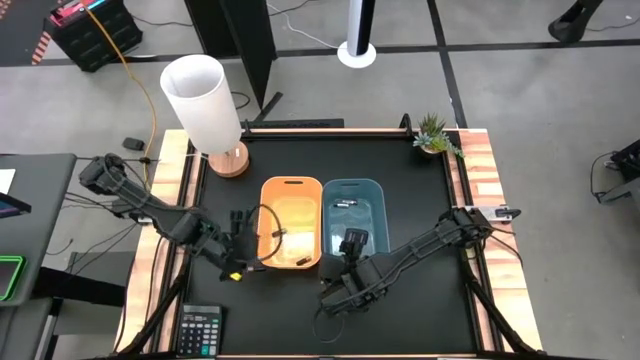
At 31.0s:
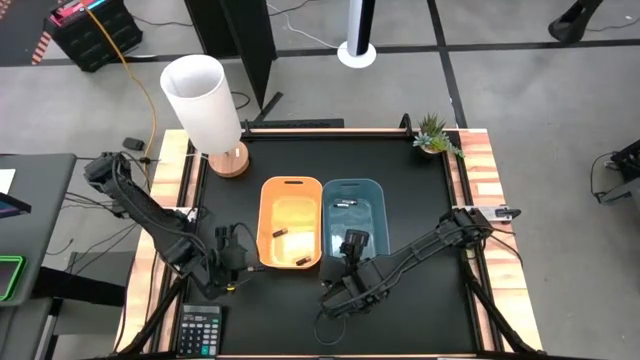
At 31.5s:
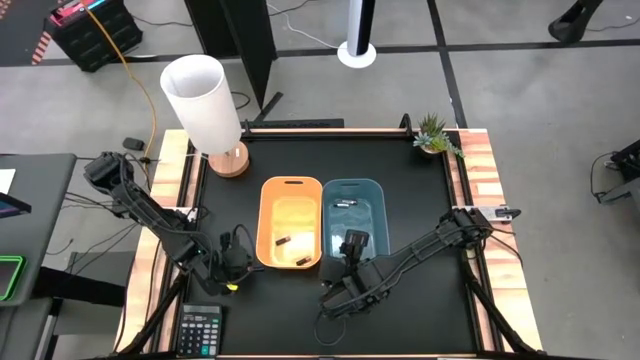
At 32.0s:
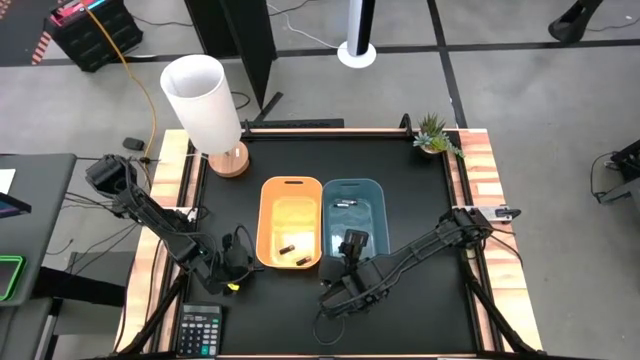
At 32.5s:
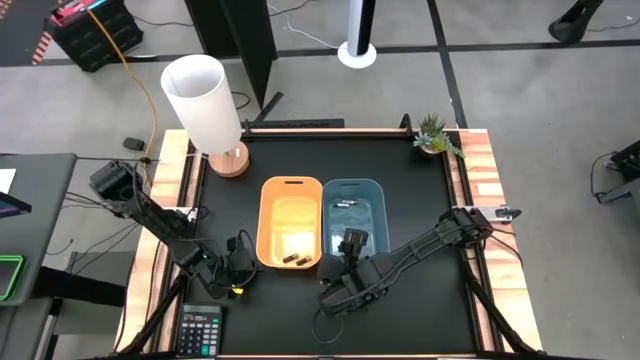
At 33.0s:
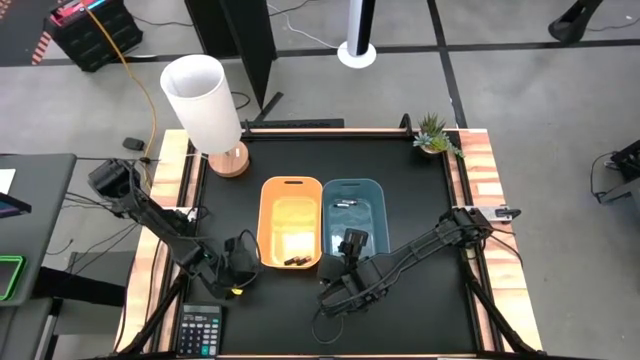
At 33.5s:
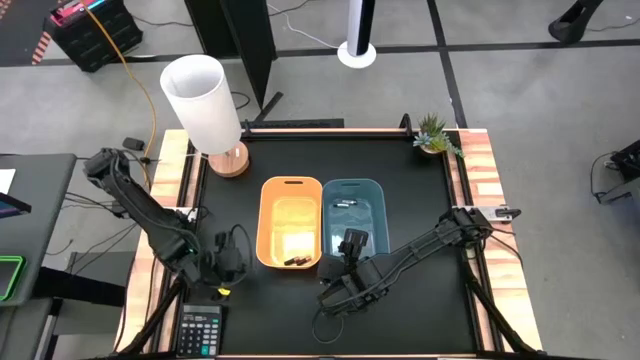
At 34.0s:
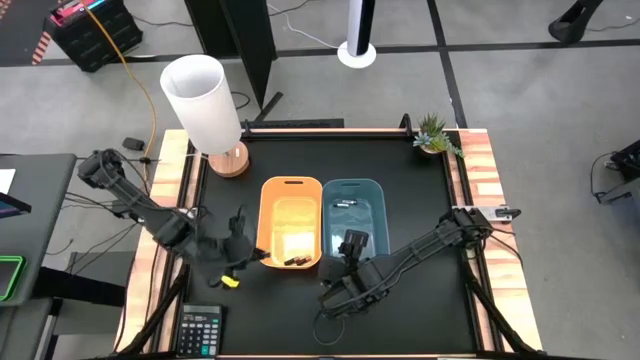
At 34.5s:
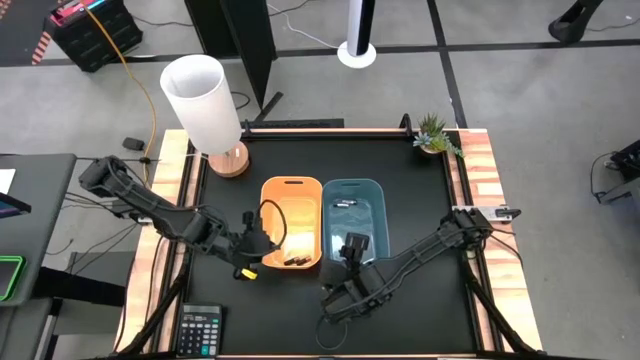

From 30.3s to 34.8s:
Task: Sort batteries
Put the black battery into the orange bin

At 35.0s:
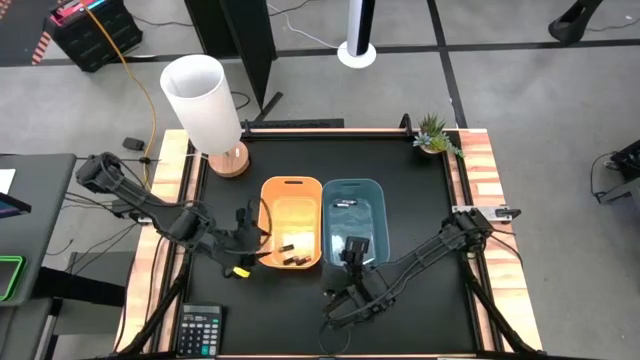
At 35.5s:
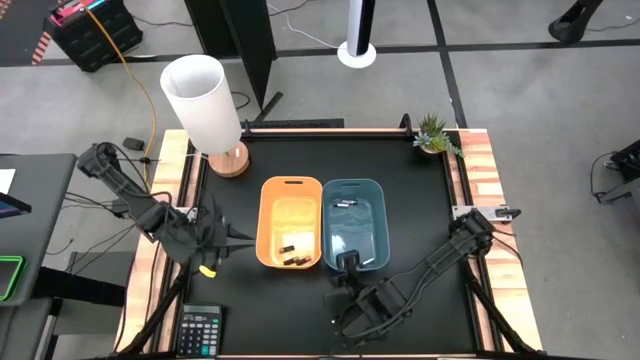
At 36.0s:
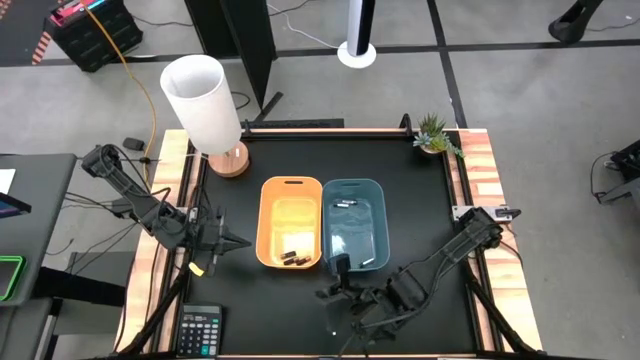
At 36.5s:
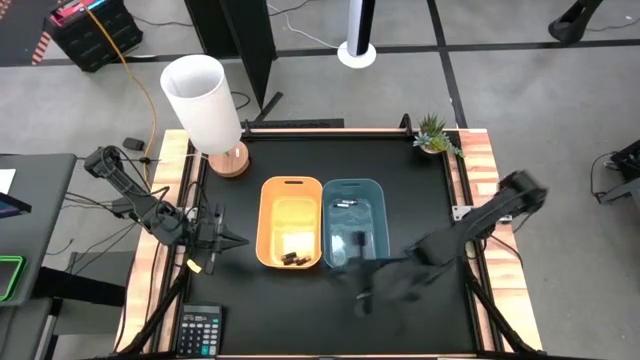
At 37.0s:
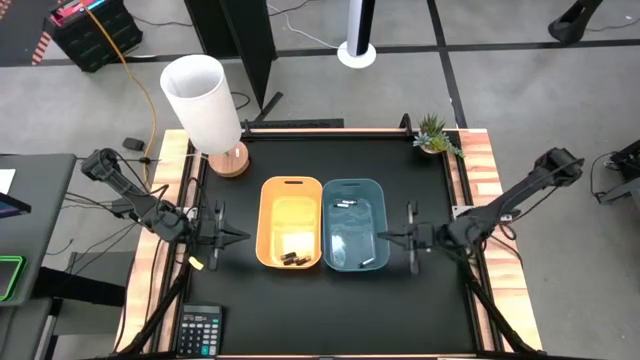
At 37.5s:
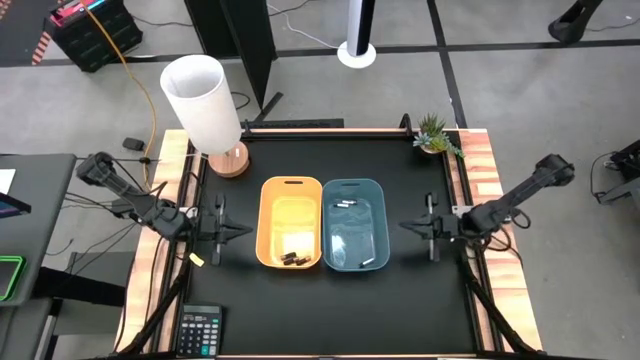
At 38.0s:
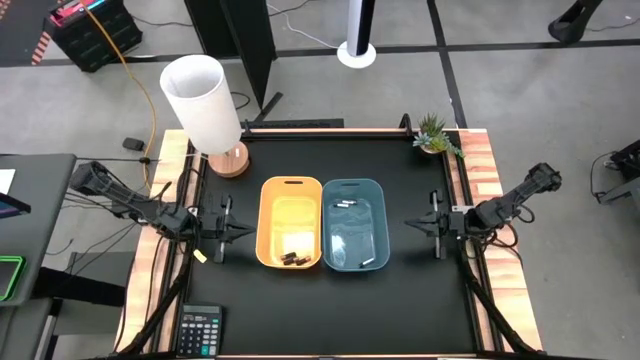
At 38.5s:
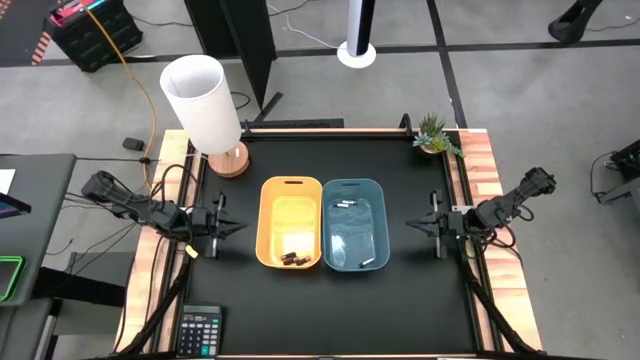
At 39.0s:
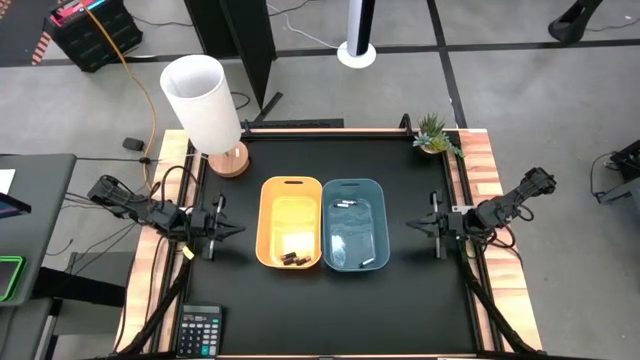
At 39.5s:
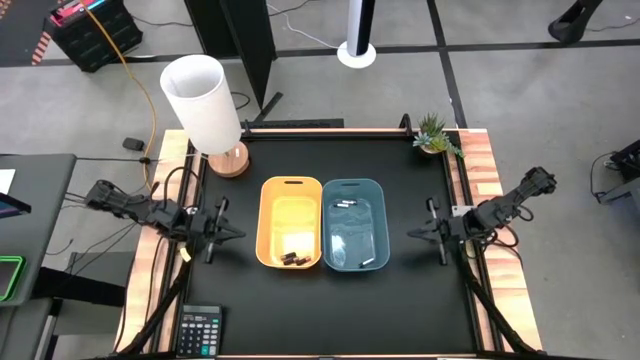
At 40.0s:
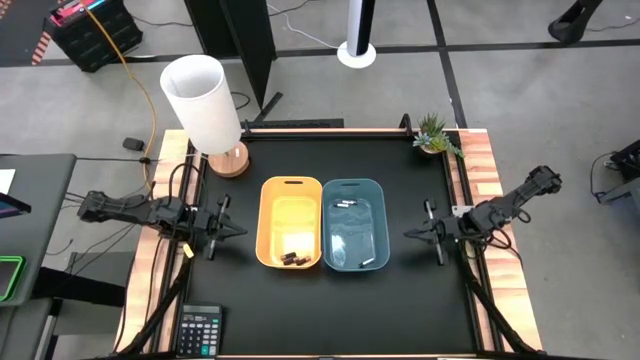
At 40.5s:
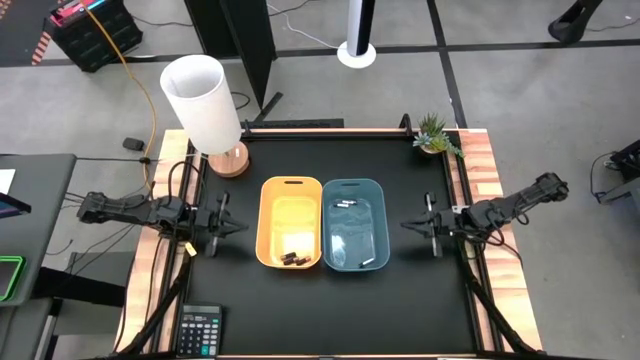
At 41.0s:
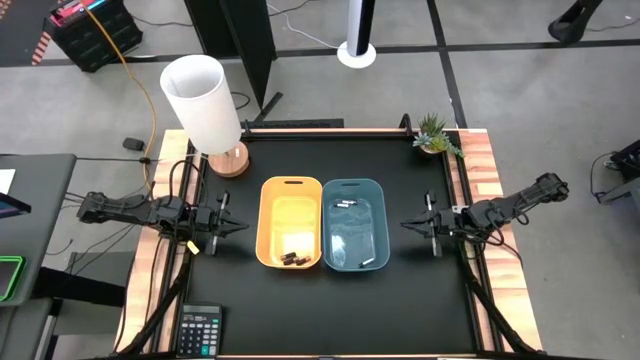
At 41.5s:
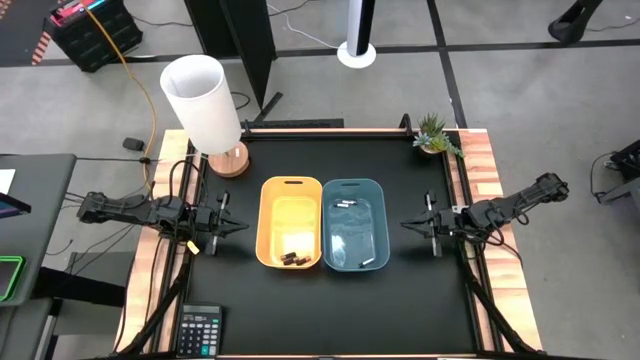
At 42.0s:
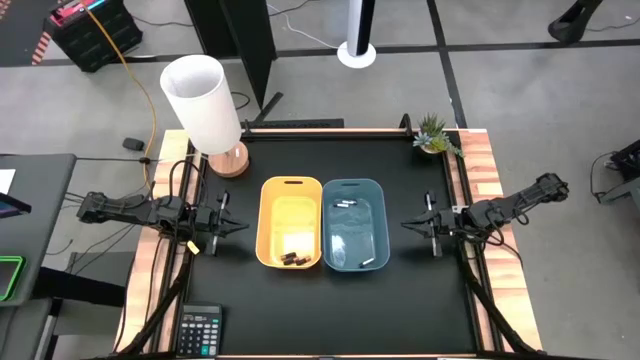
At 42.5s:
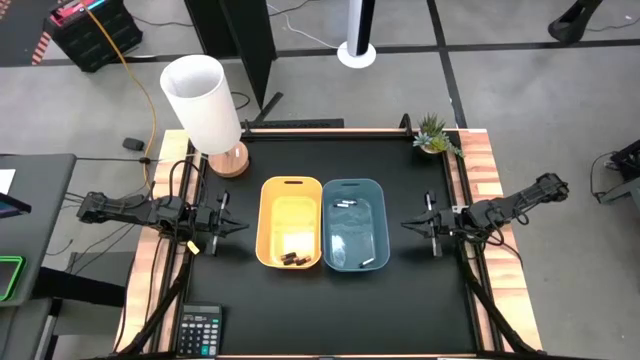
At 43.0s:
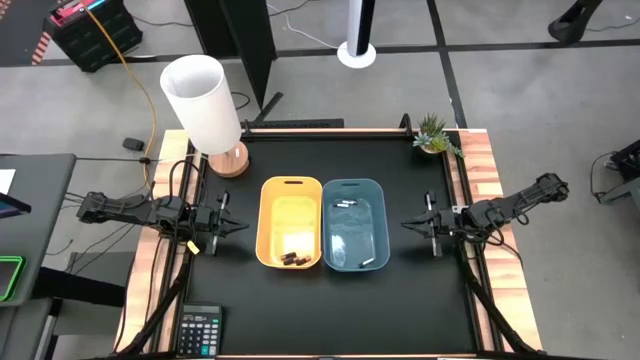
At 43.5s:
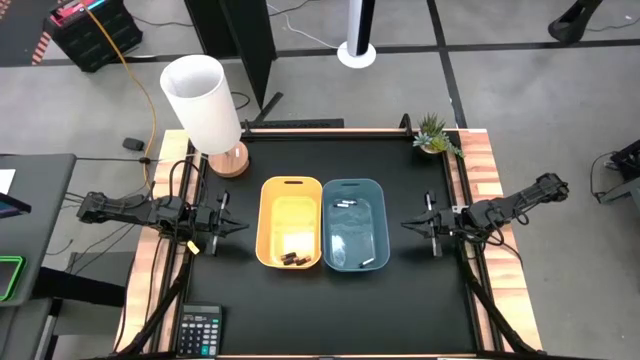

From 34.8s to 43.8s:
Return to Home Position

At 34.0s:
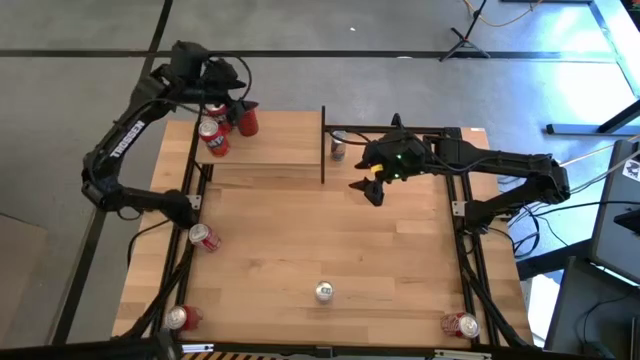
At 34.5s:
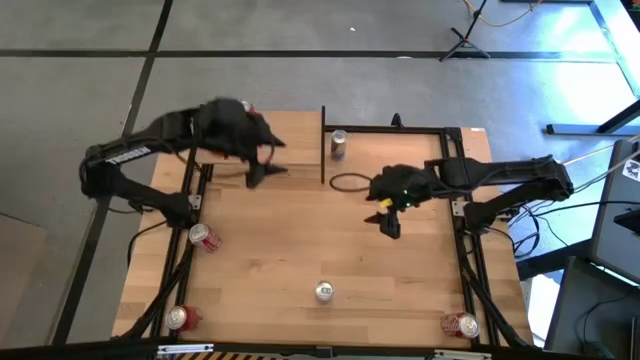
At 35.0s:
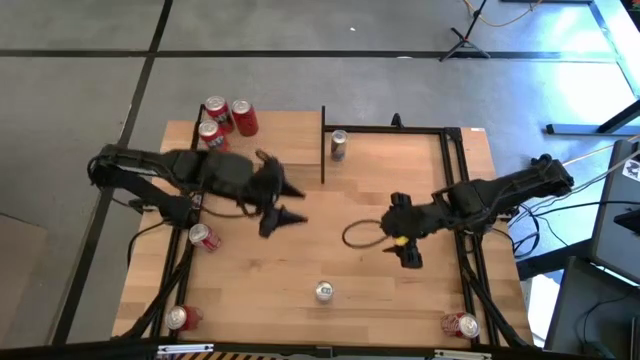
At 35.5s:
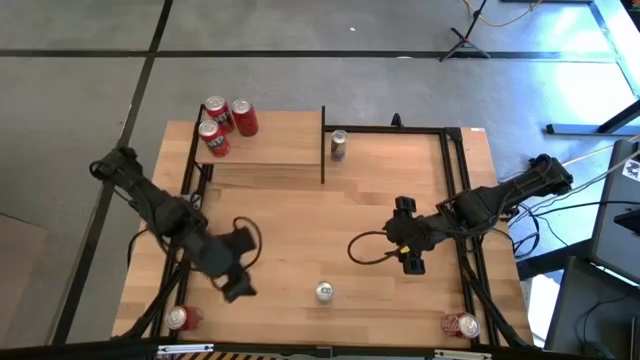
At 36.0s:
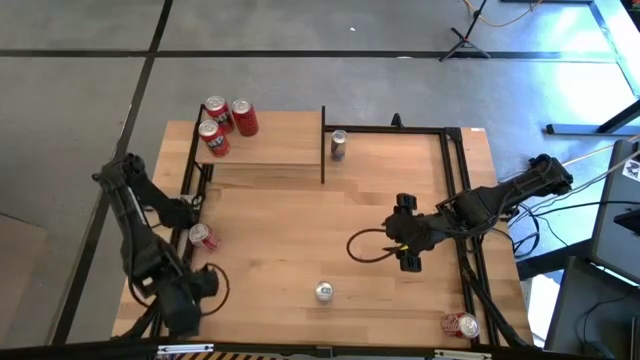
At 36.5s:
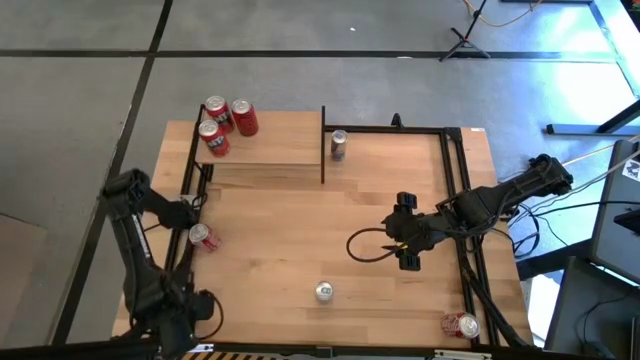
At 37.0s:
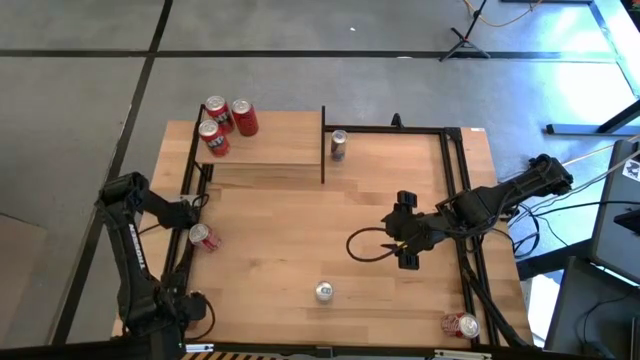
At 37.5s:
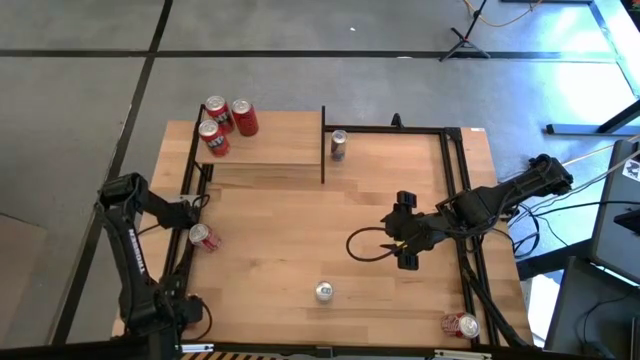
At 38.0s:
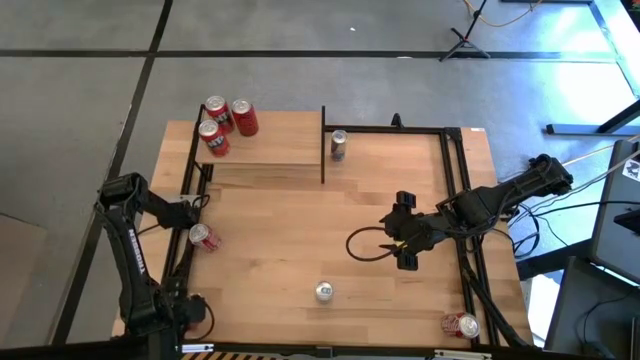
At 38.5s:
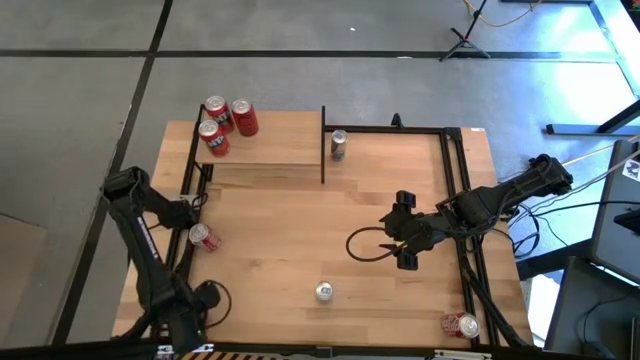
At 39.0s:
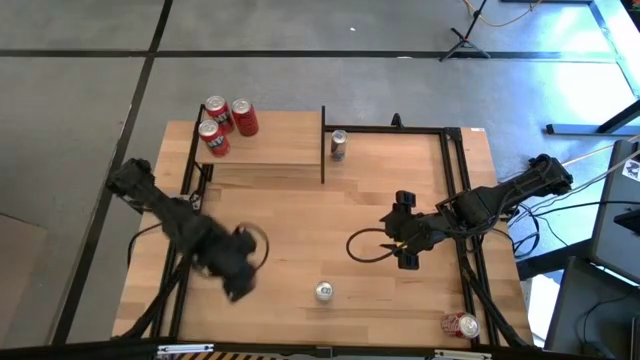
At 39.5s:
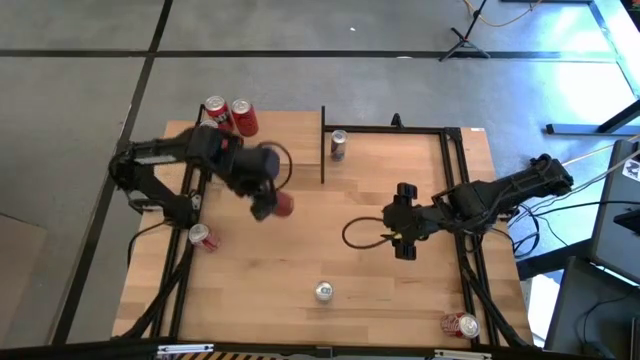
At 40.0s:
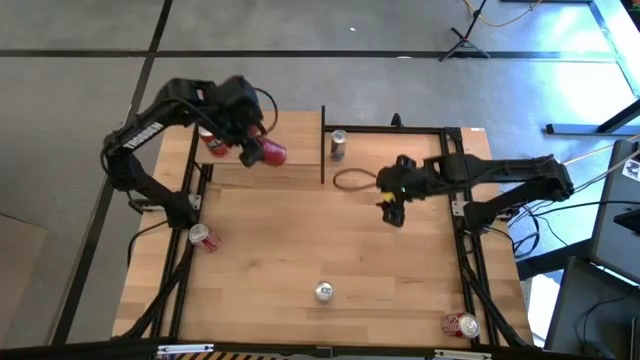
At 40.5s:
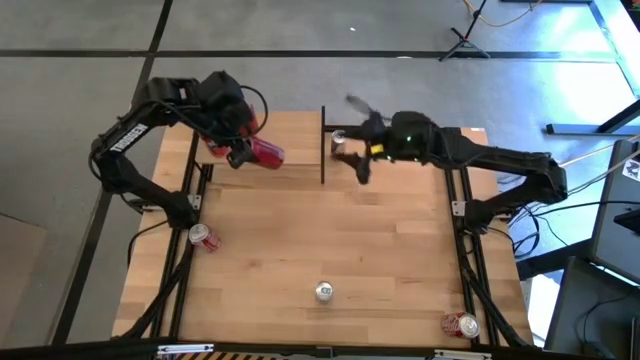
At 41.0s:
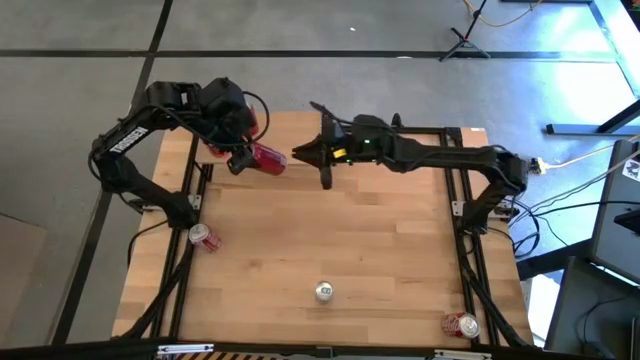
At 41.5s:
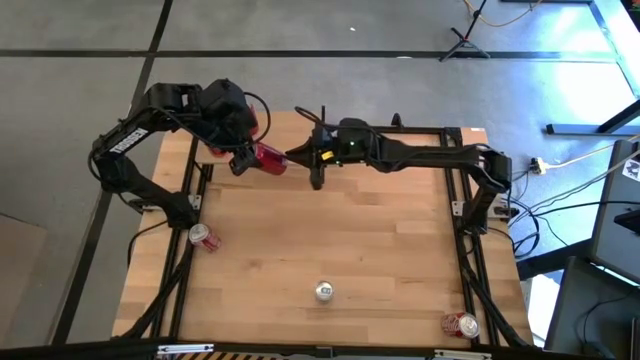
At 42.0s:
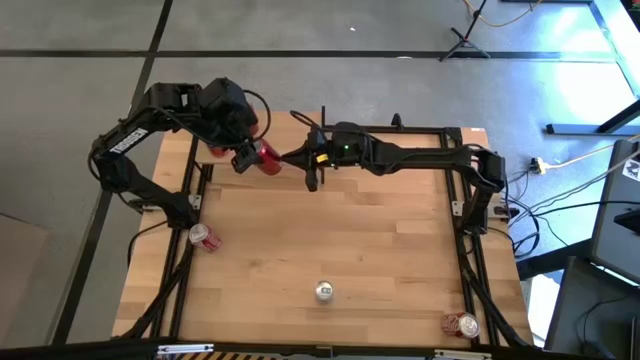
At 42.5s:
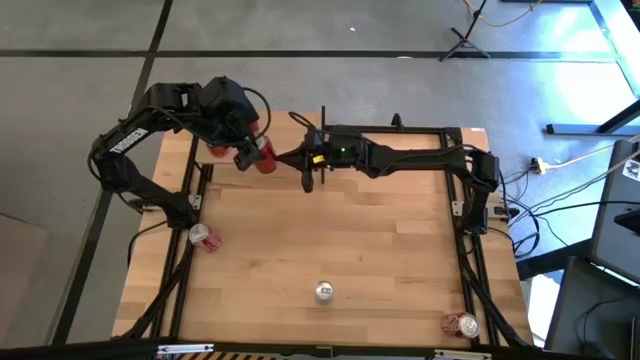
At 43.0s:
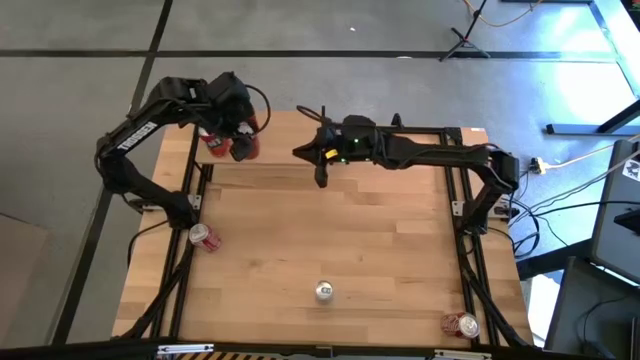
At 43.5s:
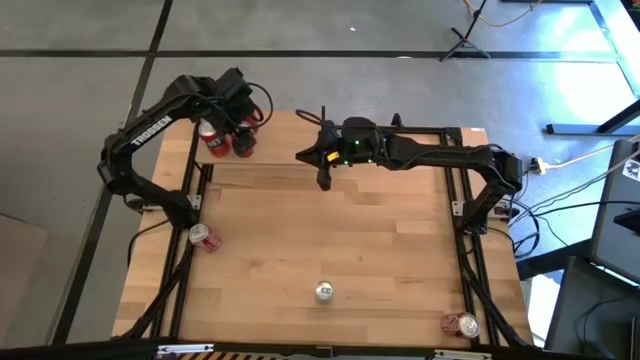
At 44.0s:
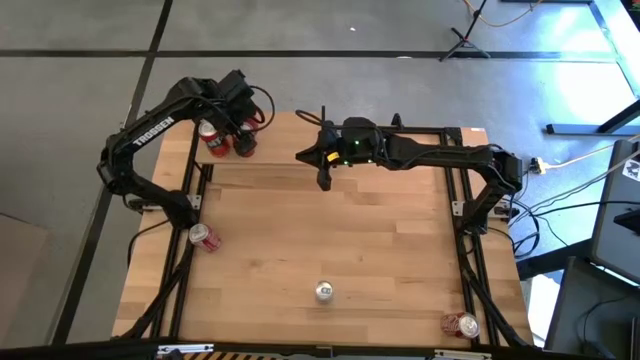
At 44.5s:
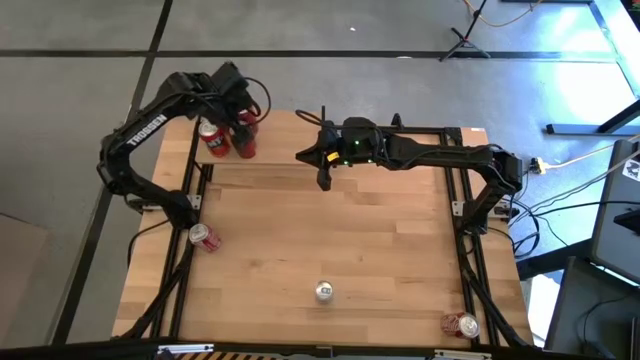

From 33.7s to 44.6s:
Task: Place canned beverage on shelf
Put the red black soda can on the shelf aligned with the other red black soda can
